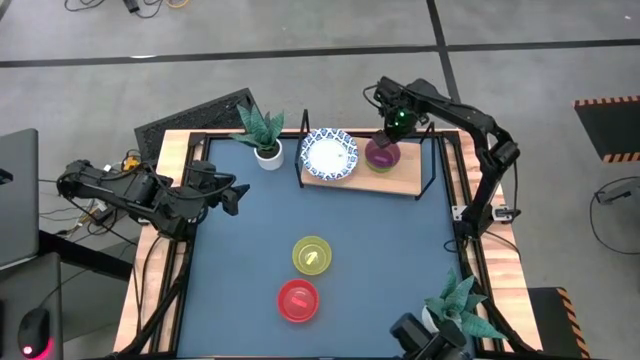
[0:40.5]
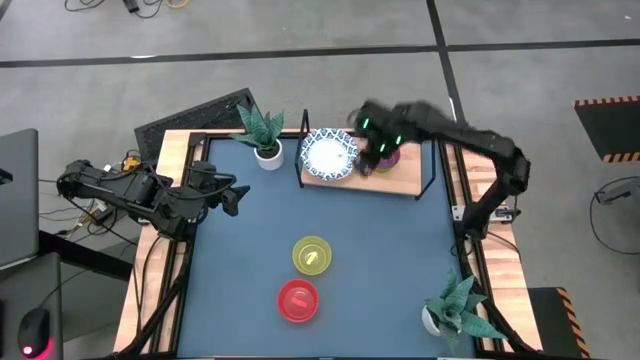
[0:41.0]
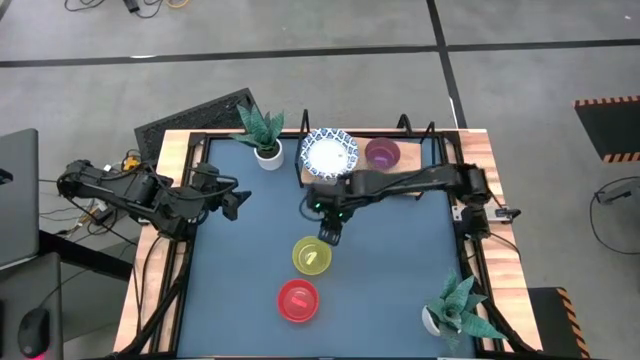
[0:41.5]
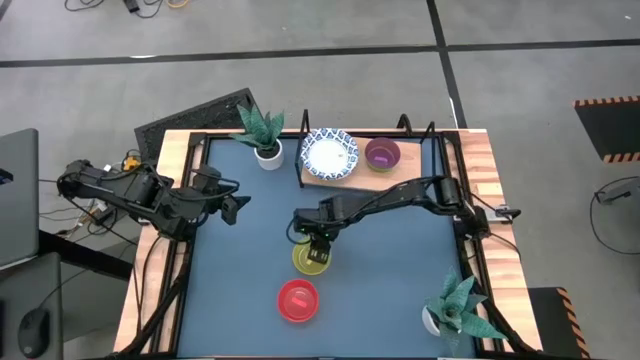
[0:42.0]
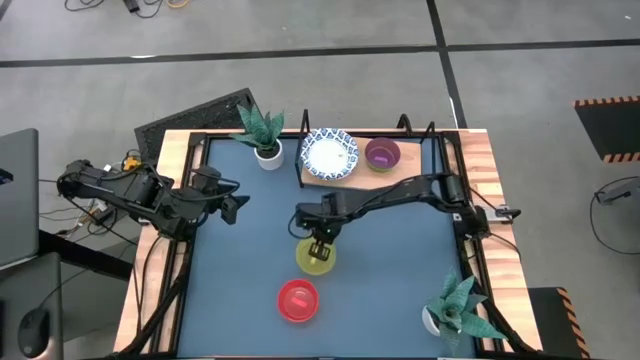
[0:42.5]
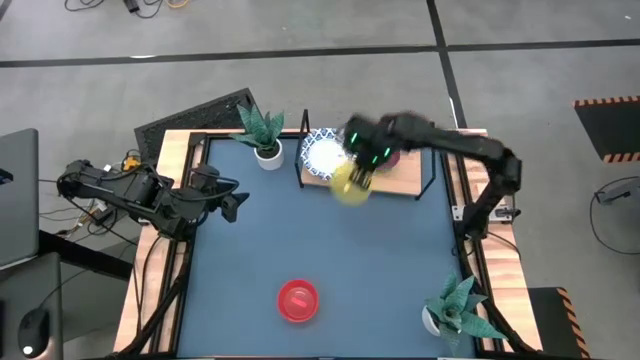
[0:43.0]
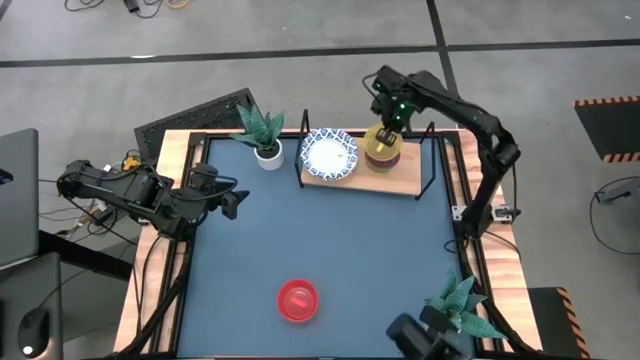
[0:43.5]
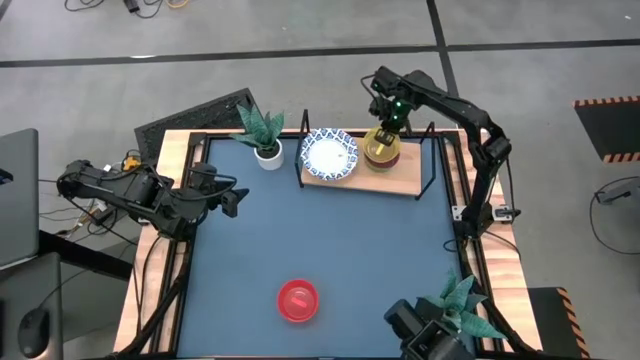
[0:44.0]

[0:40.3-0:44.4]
Task: Place and stack bowls onto a shelf
Stack the yellow bowl on top of the purple bowl on the shelf

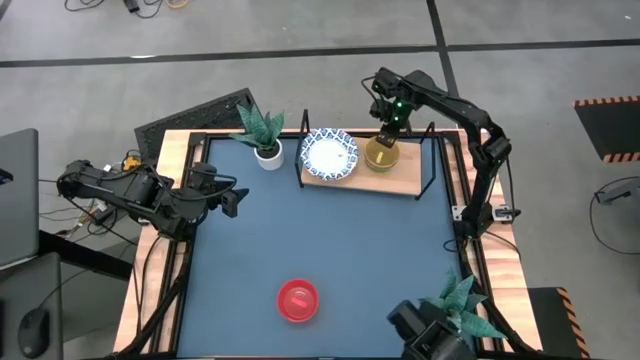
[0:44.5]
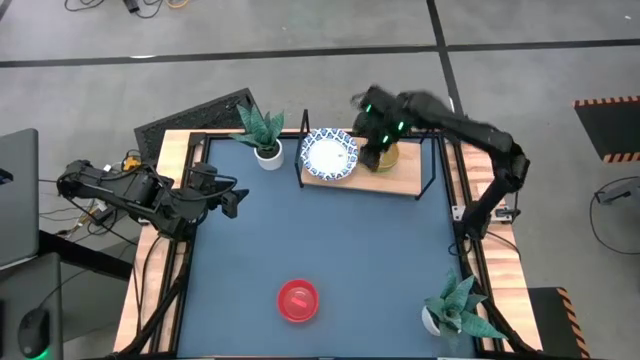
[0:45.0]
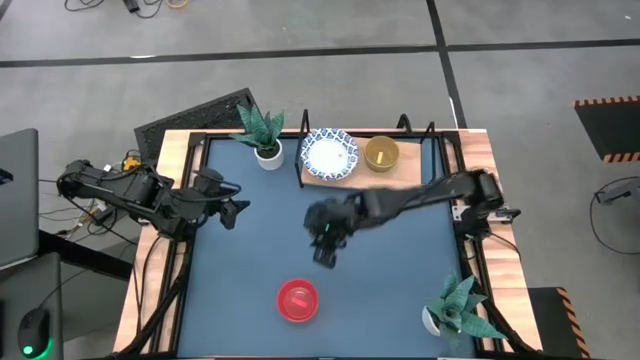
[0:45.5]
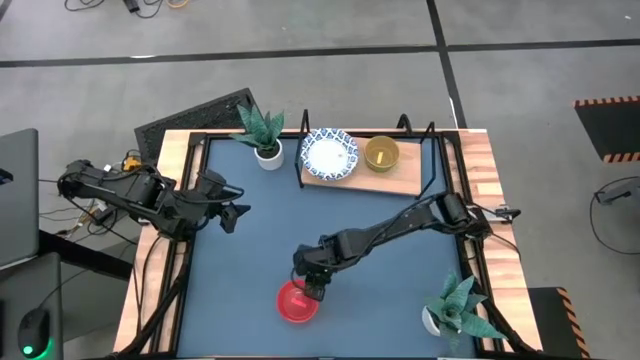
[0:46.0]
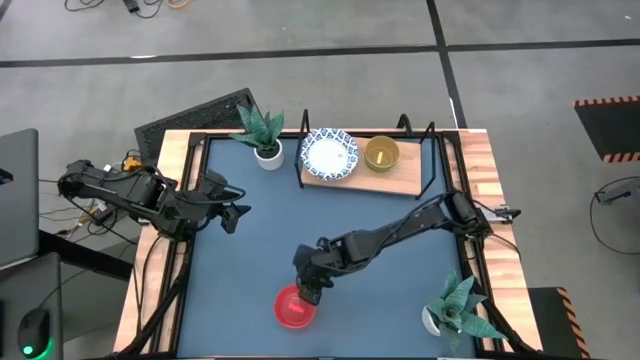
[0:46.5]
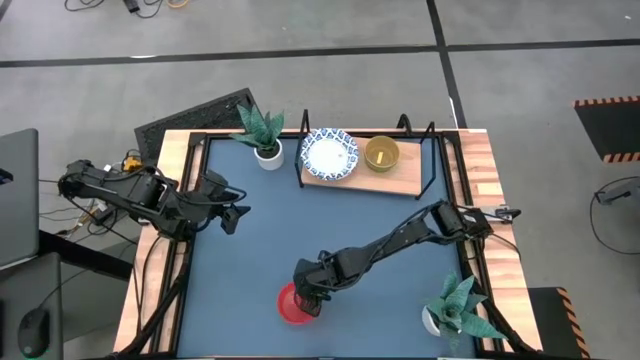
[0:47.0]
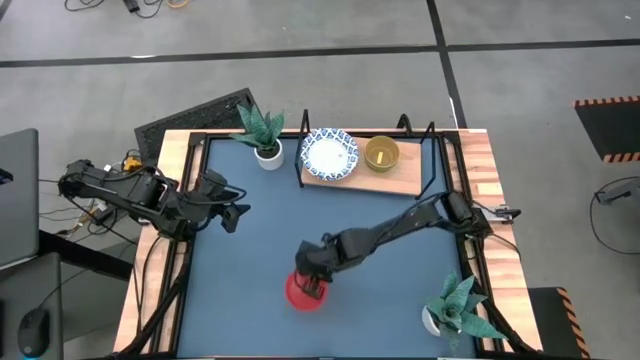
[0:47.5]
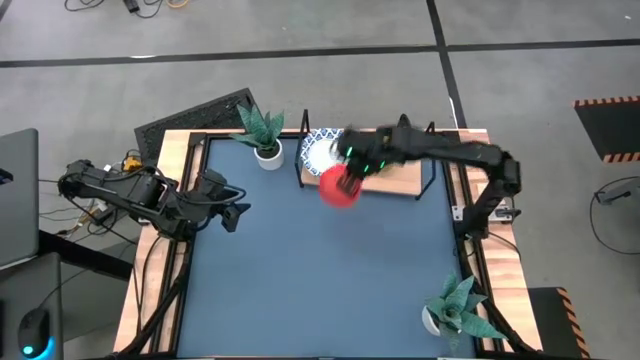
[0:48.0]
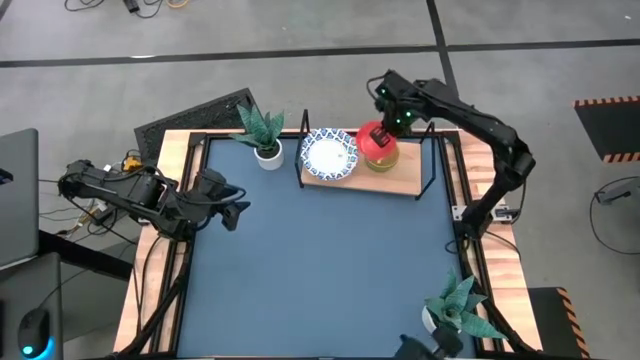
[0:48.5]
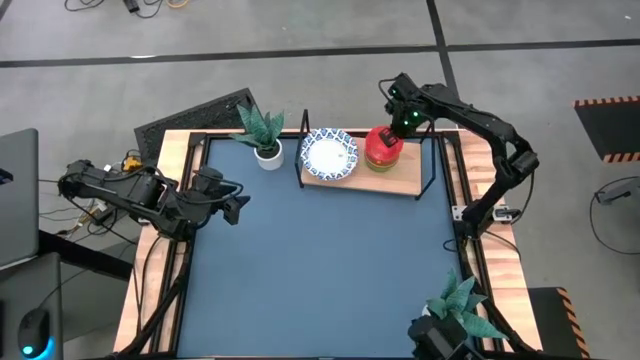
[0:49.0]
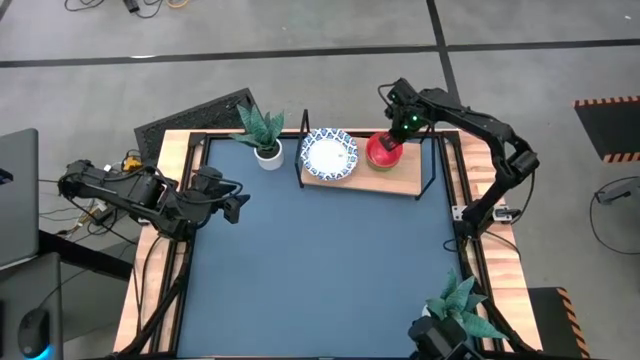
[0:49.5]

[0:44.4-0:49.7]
Stack the red bowl on top of the yellow bowl on the shelf

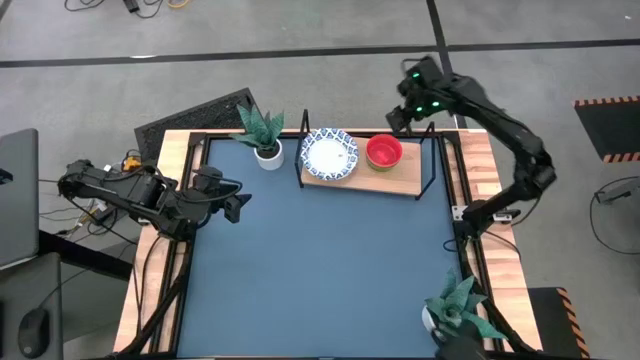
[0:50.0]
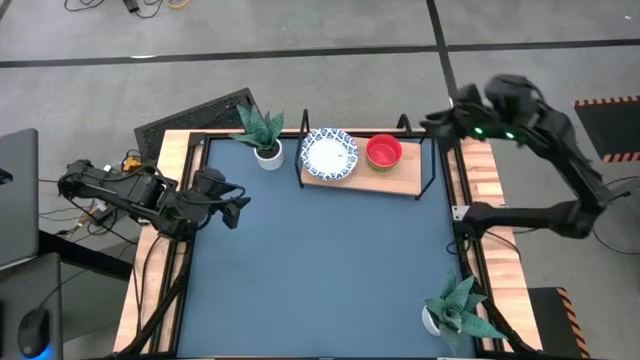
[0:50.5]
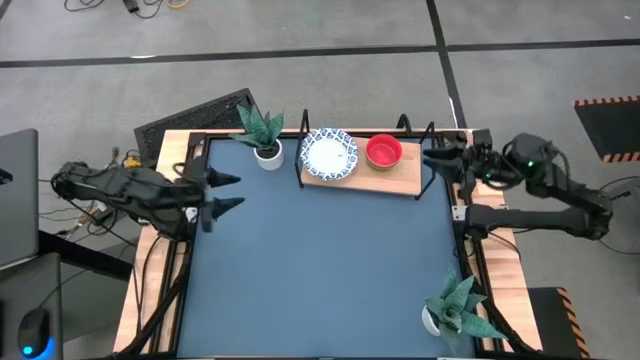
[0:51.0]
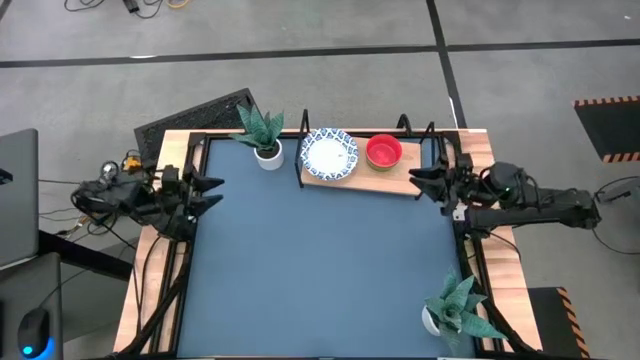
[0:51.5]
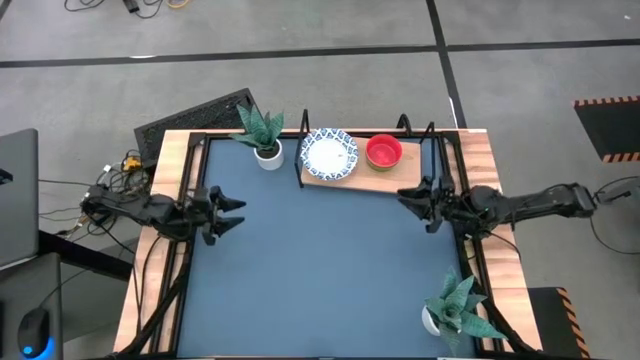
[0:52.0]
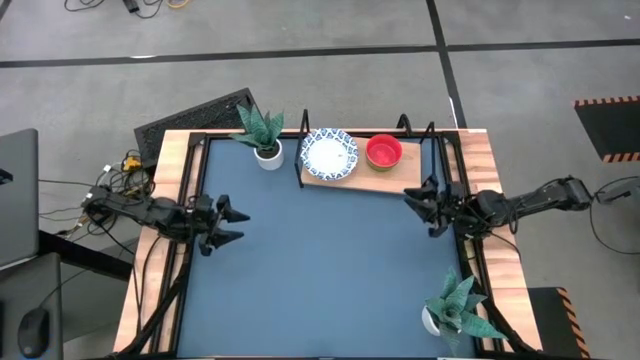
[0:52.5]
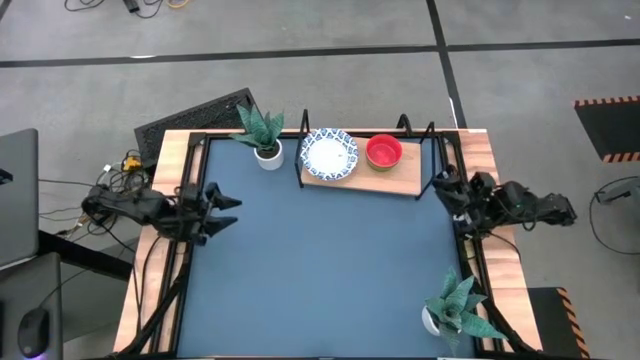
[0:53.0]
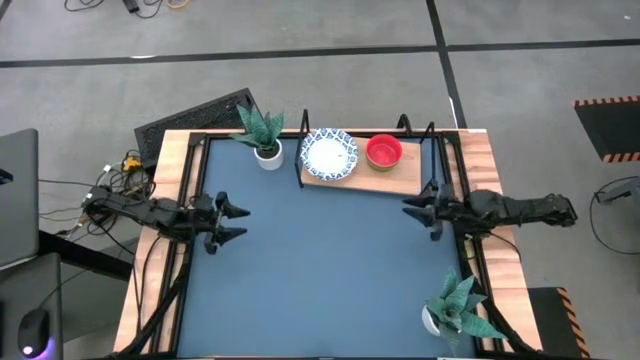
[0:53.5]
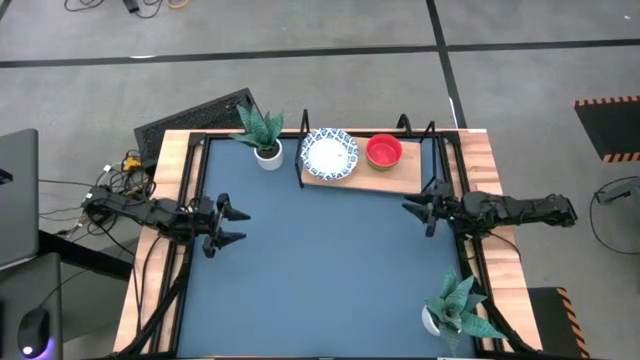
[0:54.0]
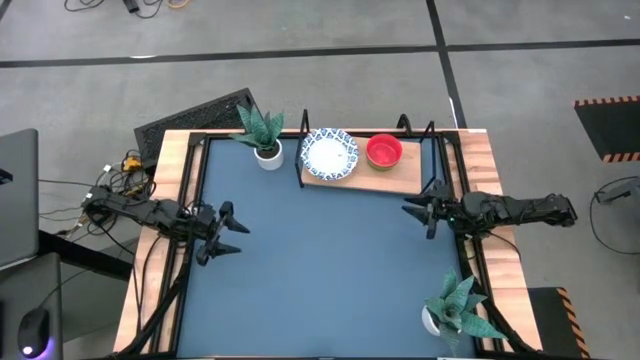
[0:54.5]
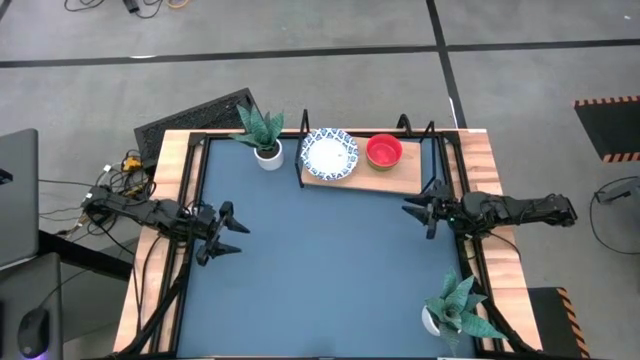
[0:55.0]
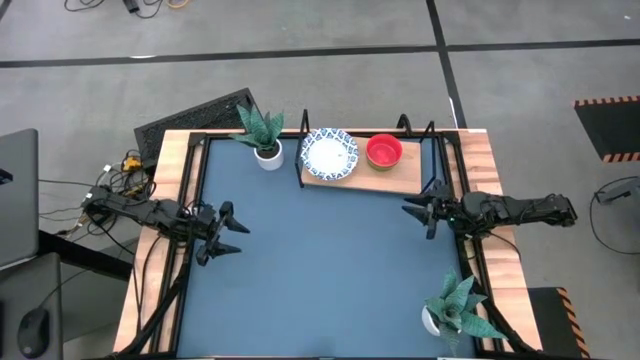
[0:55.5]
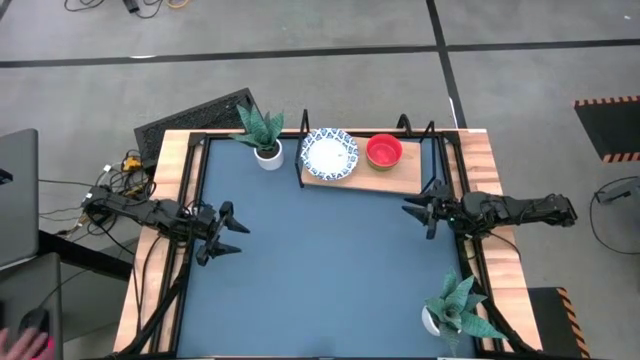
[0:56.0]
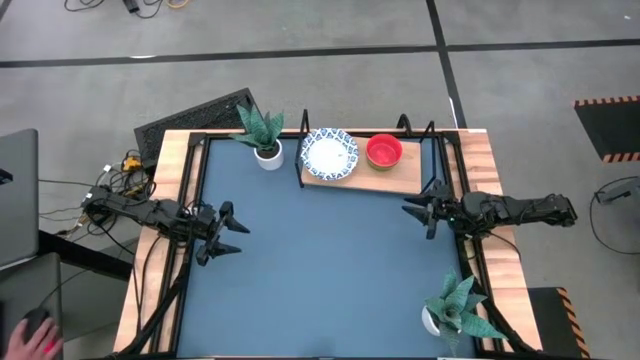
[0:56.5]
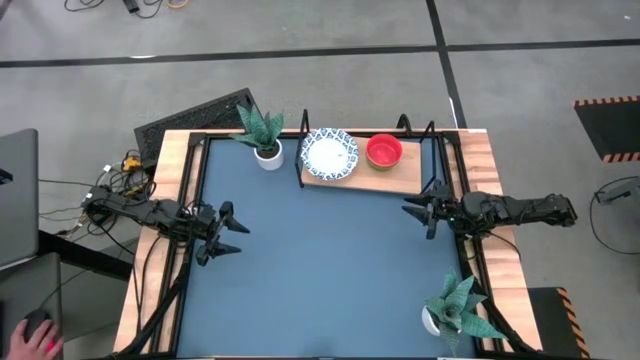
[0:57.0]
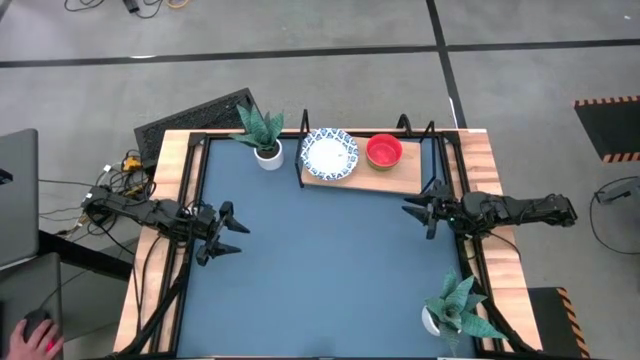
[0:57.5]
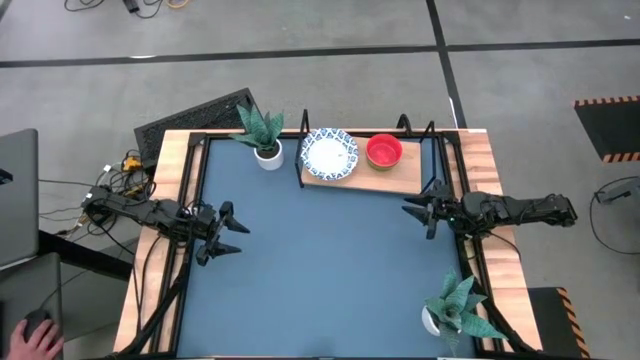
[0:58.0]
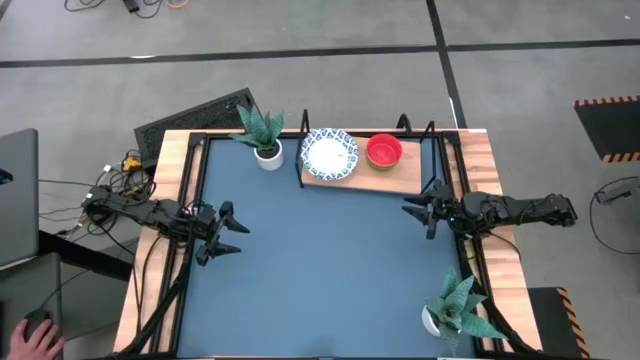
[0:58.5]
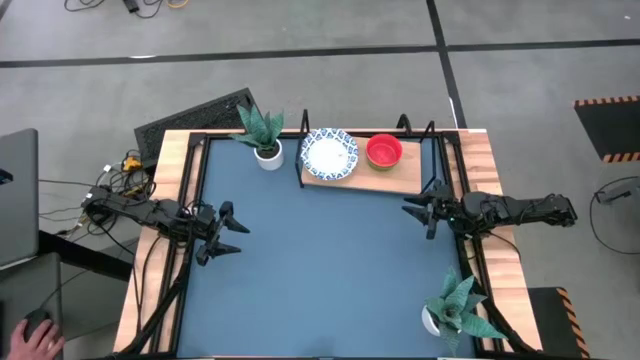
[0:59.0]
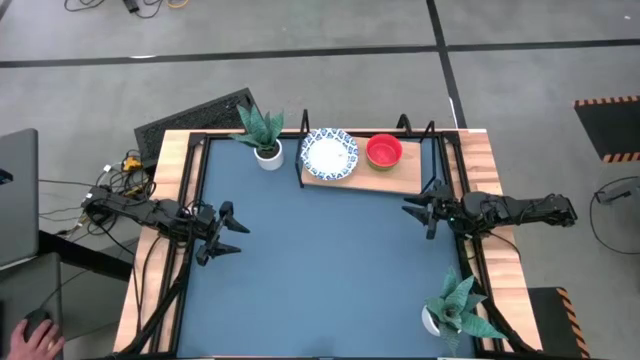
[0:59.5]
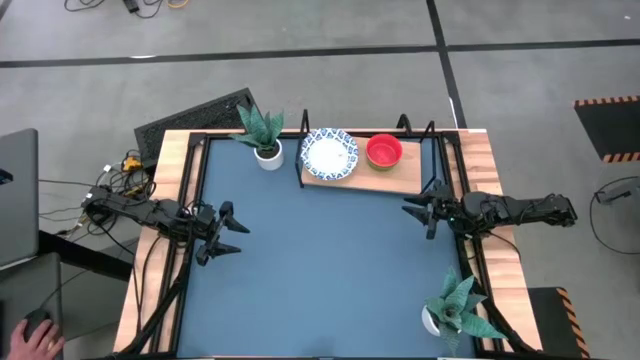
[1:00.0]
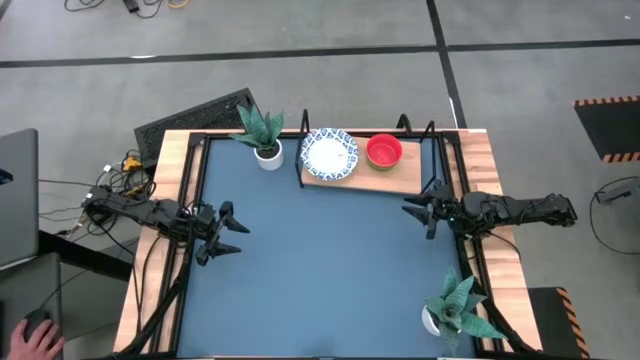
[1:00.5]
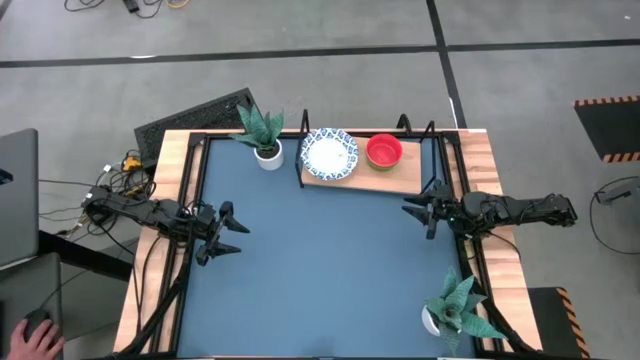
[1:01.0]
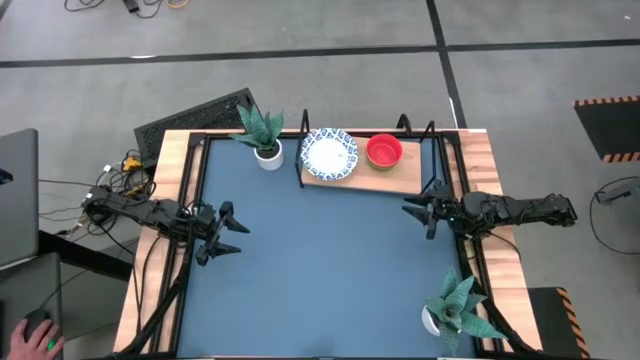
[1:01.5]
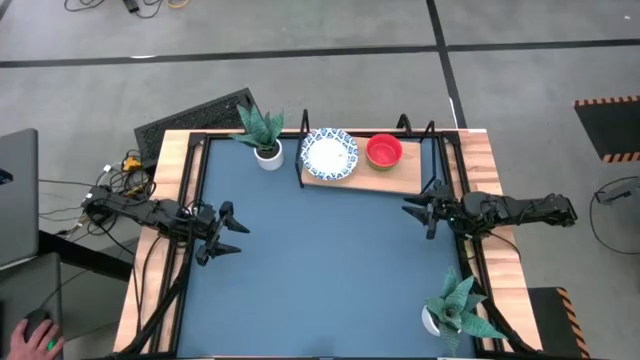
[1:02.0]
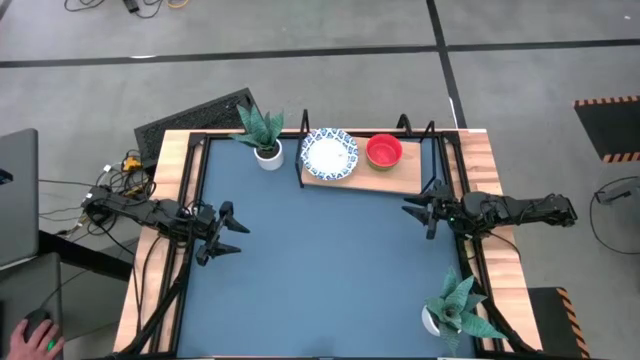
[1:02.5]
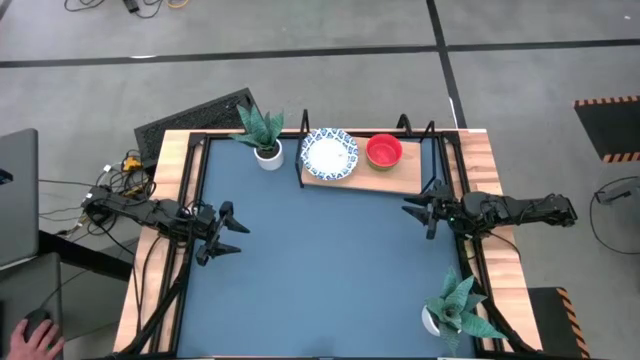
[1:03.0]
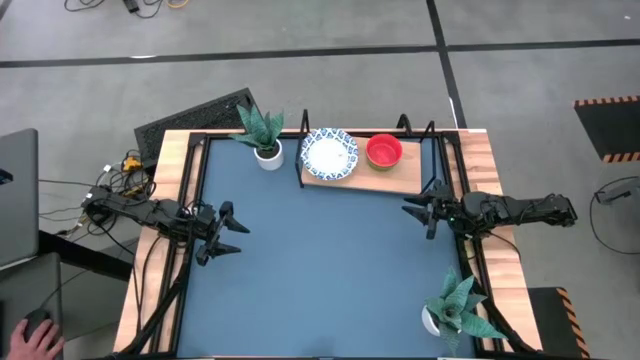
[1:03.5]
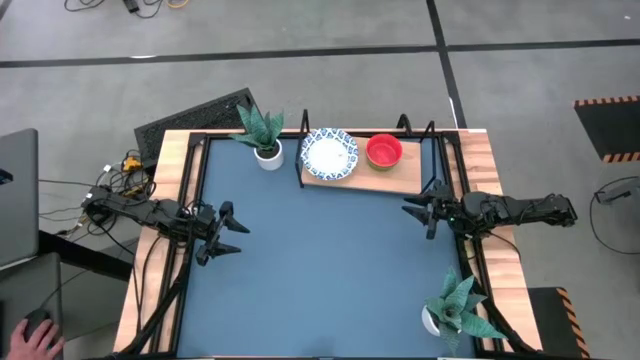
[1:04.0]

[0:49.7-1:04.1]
Return to Home Position
